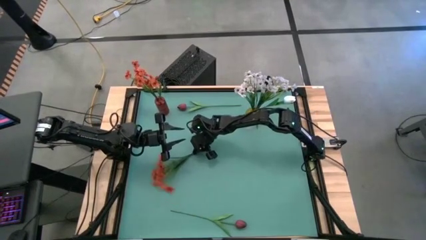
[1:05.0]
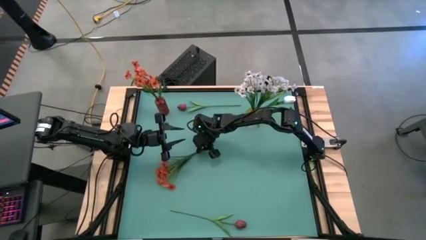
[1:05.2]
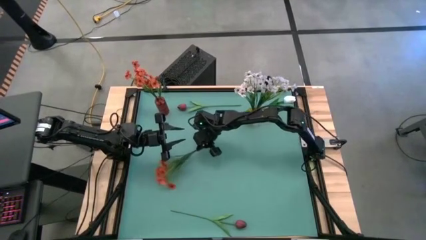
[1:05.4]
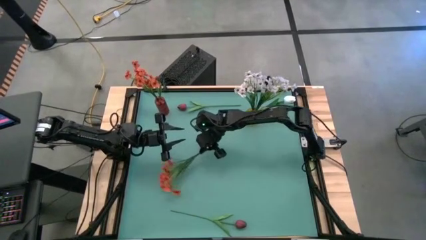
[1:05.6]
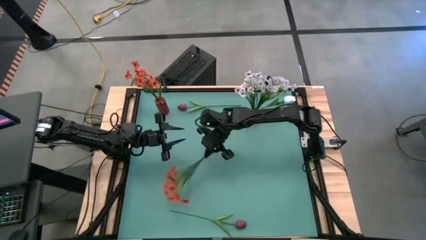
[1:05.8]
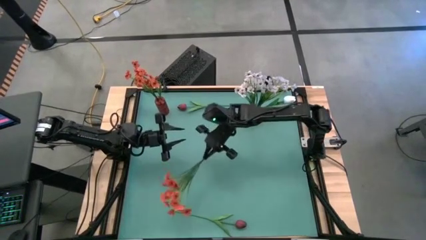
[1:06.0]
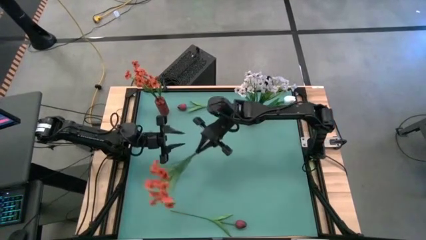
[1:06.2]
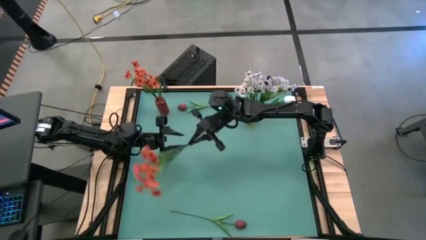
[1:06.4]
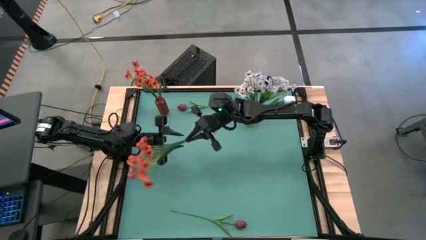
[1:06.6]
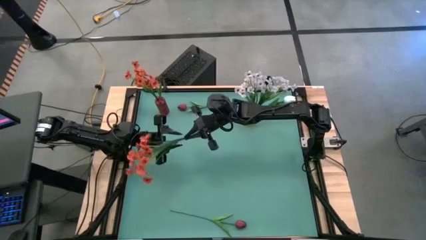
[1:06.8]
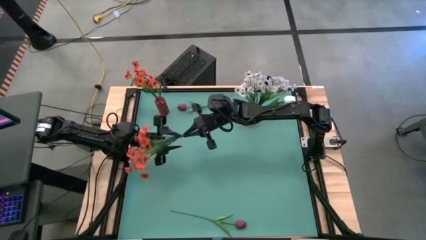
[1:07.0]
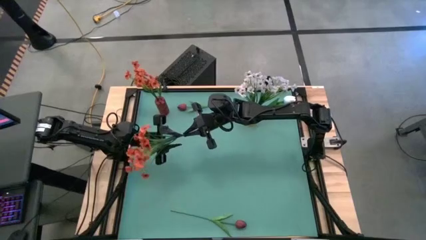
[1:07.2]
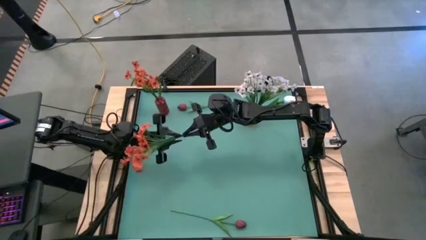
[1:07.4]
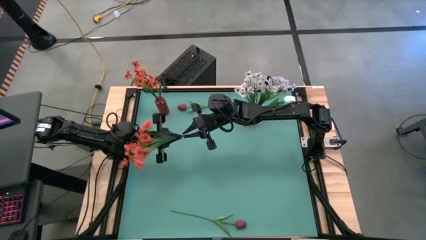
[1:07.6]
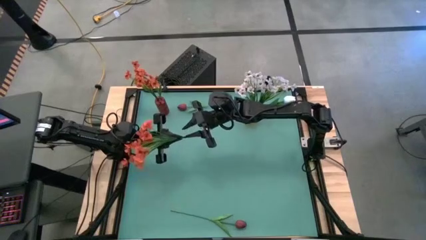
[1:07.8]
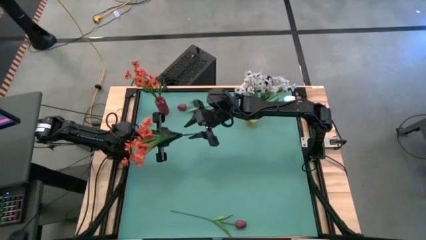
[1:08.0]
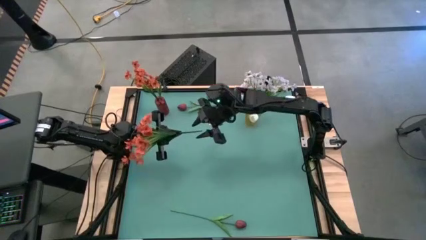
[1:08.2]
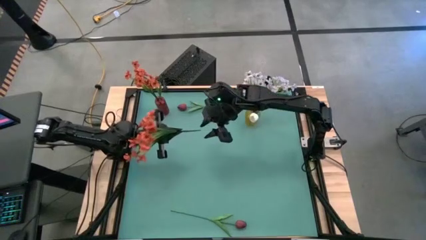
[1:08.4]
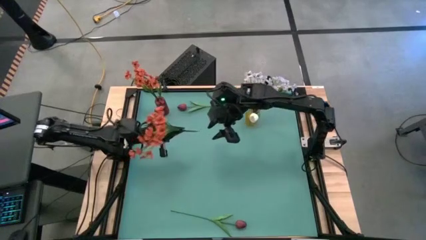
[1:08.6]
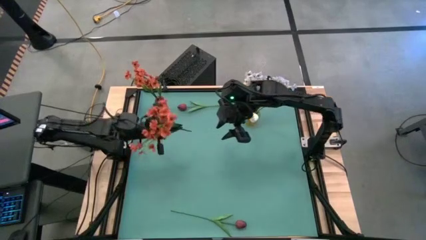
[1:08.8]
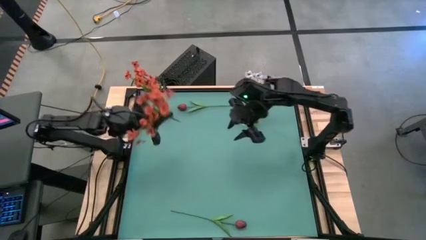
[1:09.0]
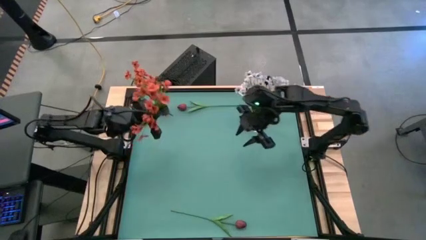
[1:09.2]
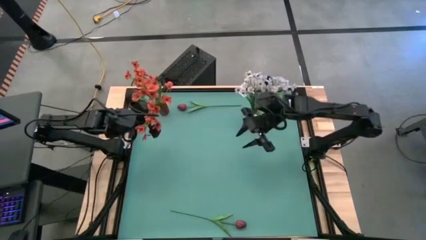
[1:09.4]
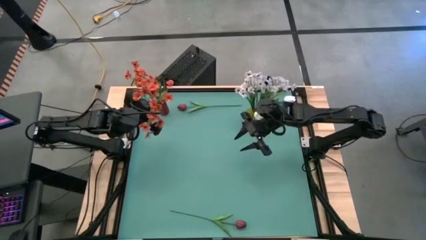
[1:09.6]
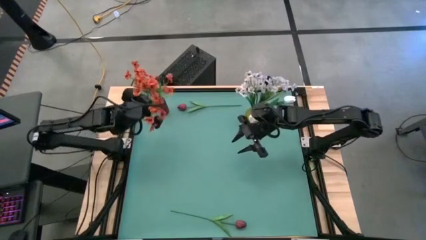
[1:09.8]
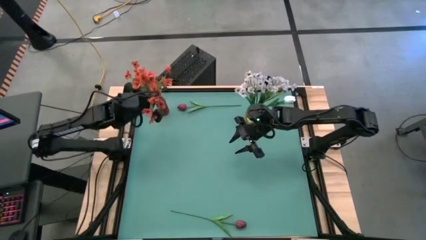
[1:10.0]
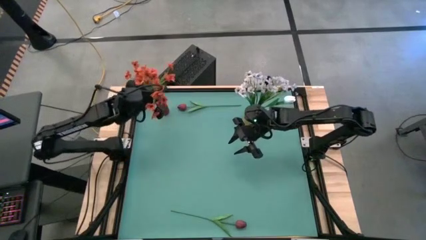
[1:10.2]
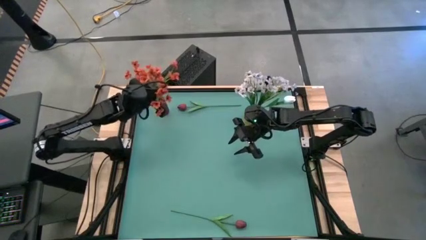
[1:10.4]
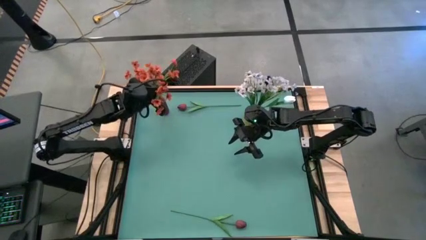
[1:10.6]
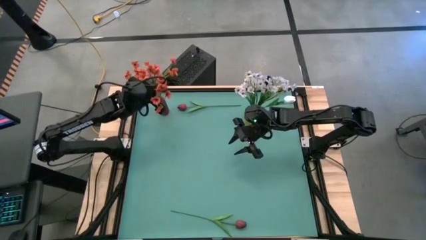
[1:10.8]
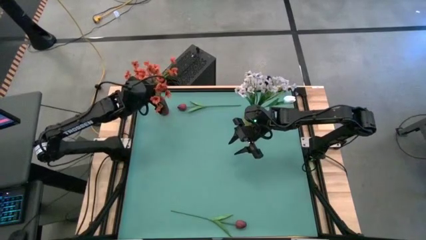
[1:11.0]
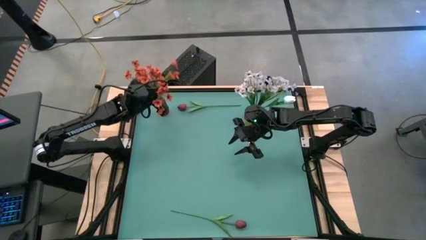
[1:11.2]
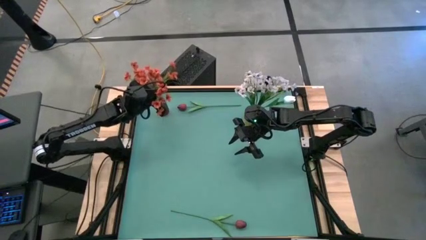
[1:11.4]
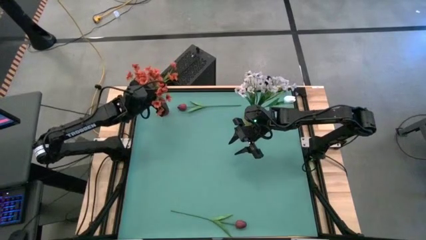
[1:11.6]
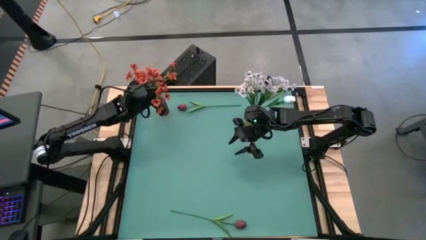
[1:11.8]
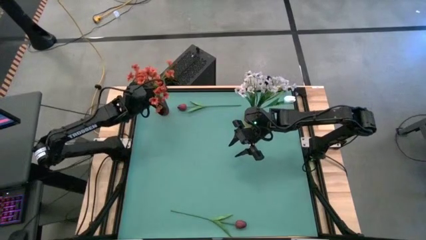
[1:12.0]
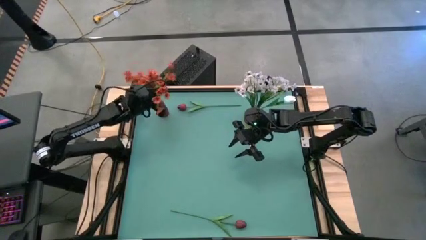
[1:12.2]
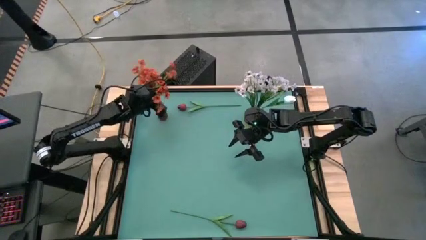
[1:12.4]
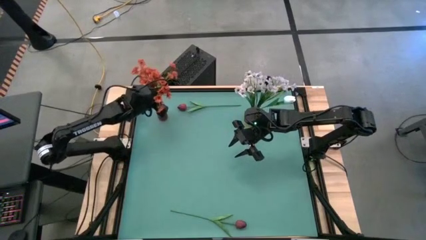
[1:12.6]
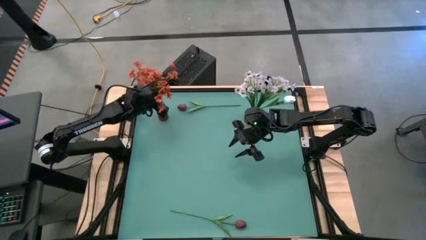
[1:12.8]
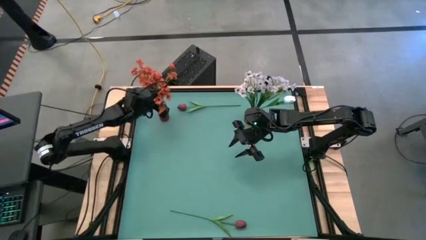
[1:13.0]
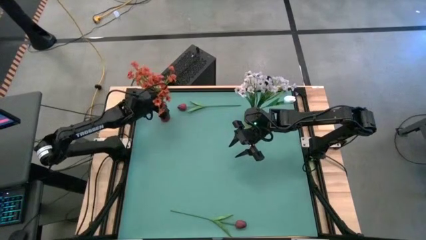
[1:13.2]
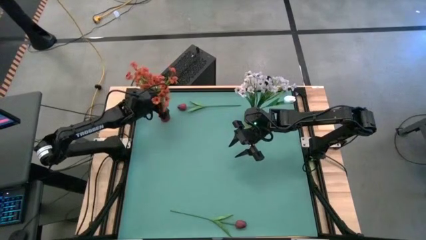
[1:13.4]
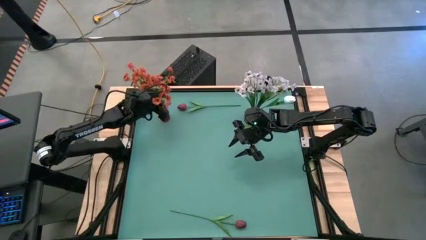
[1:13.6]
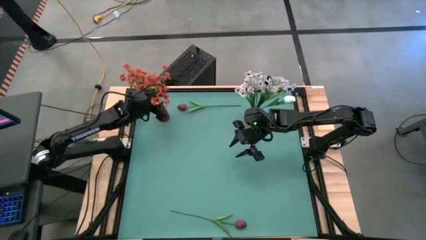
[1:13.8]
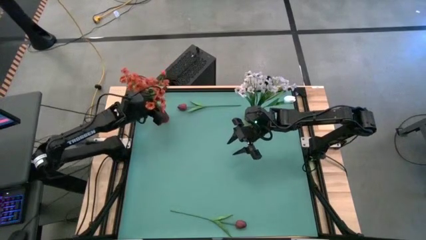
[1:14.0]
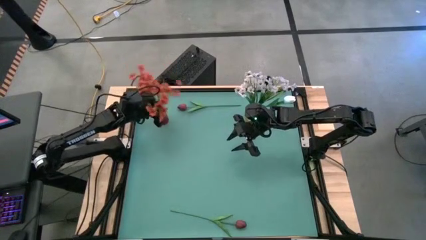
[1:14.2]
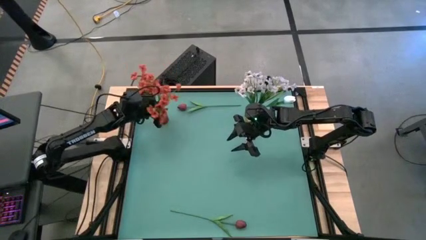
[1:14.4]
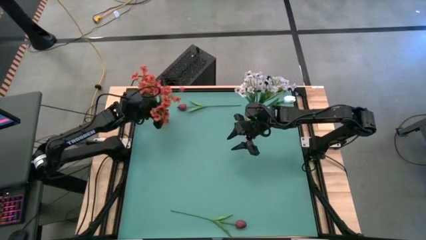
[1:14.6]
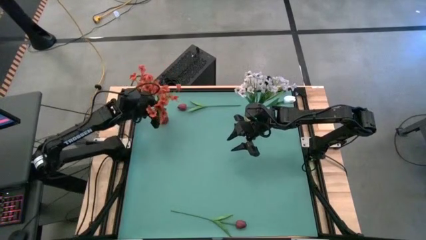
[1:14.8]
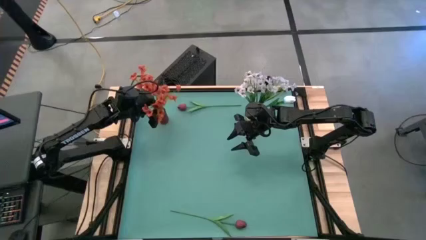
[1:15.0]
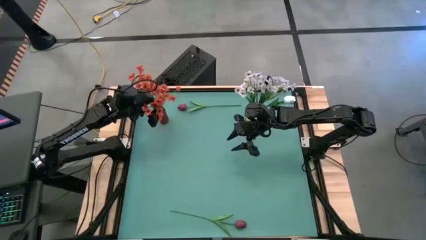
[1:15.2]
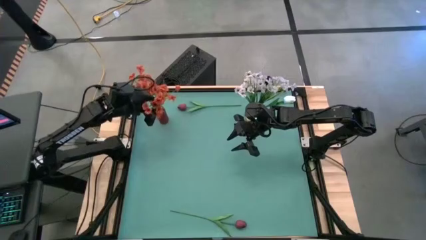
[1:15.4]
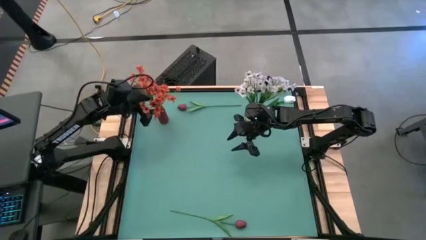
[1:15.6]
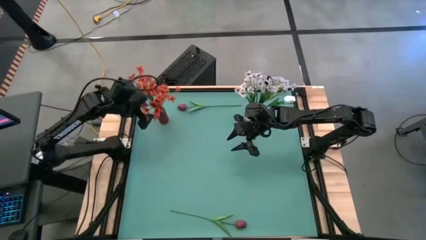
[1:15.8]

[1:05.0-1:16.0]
Task: Sort flowers into vase by color
Put the orange flowers into the red flower vase

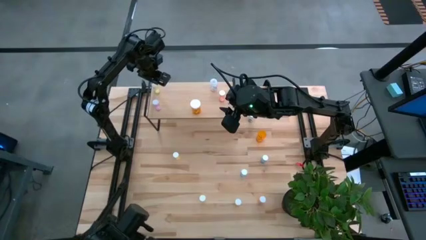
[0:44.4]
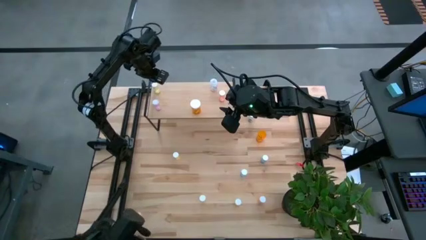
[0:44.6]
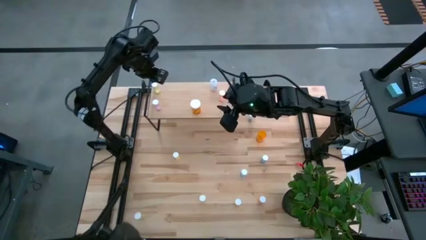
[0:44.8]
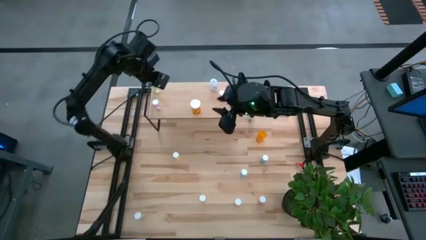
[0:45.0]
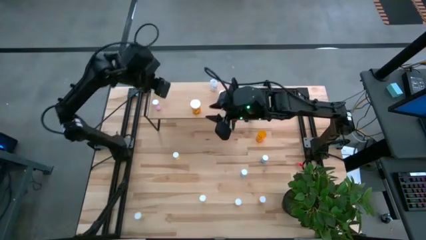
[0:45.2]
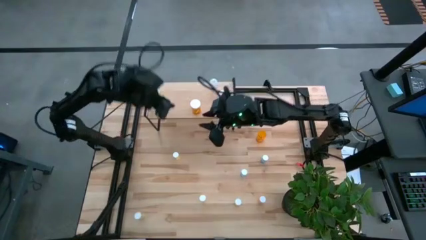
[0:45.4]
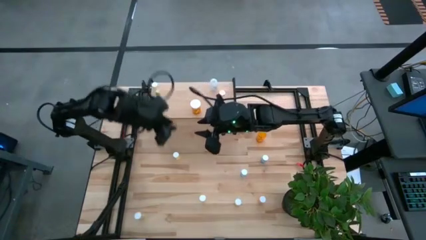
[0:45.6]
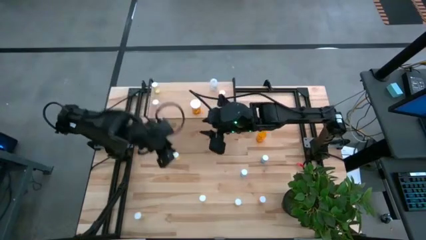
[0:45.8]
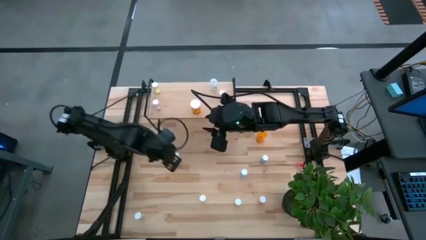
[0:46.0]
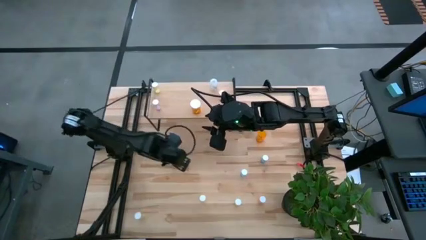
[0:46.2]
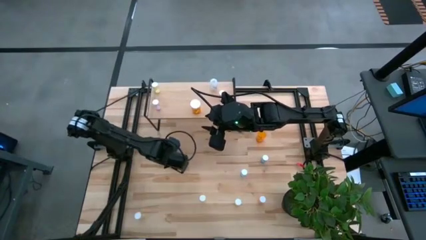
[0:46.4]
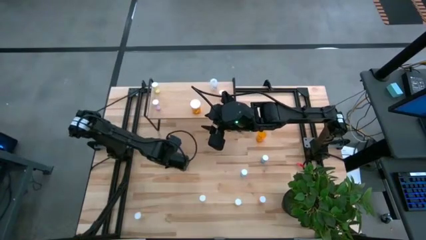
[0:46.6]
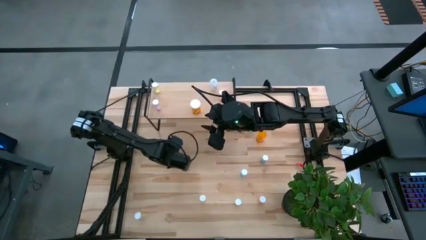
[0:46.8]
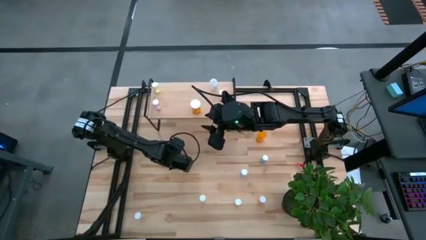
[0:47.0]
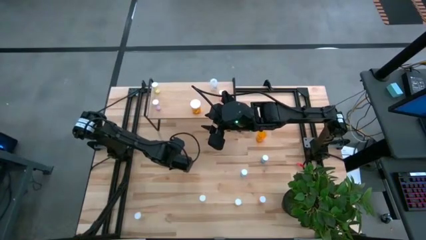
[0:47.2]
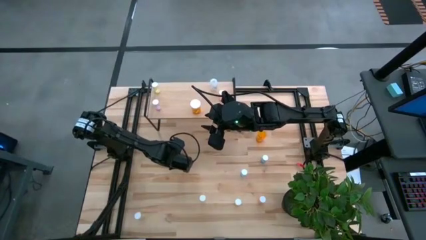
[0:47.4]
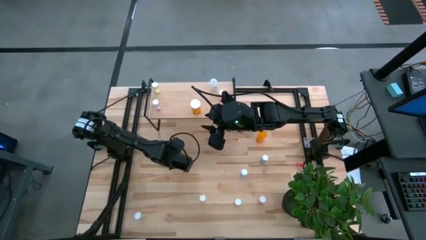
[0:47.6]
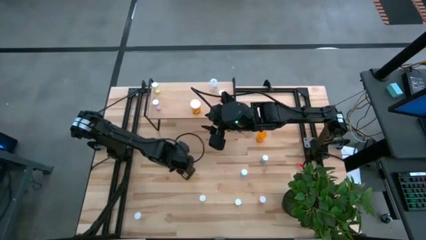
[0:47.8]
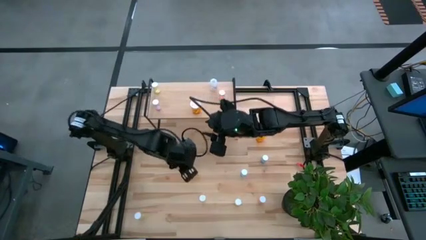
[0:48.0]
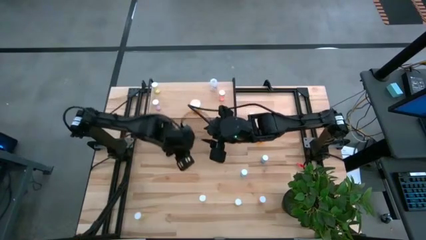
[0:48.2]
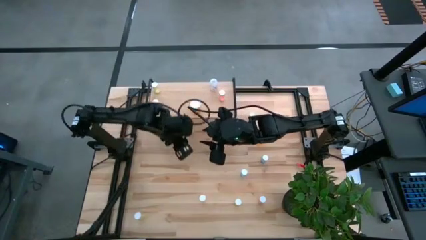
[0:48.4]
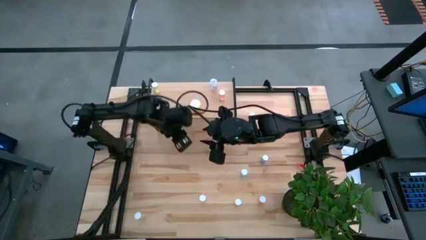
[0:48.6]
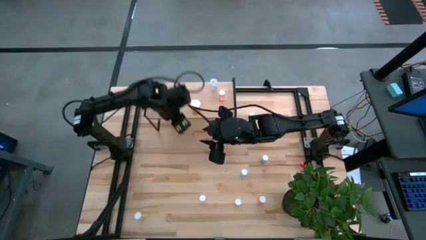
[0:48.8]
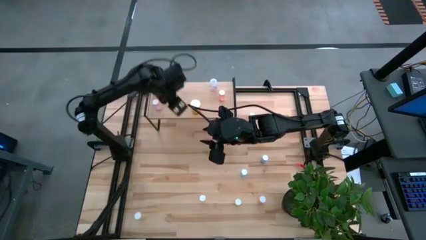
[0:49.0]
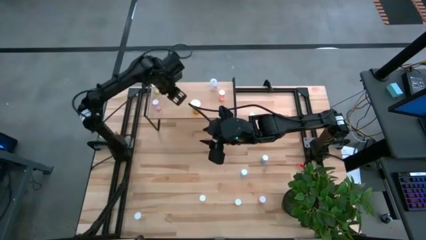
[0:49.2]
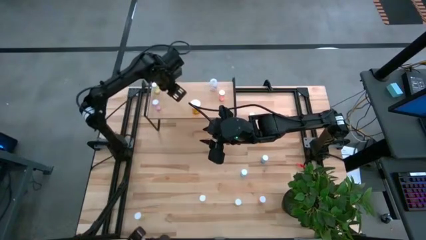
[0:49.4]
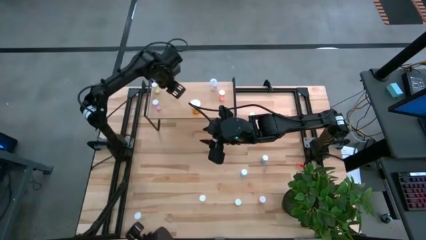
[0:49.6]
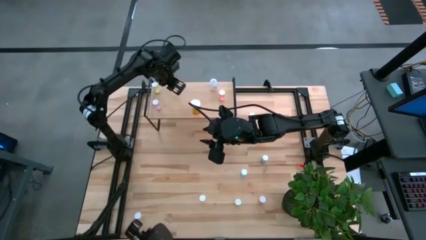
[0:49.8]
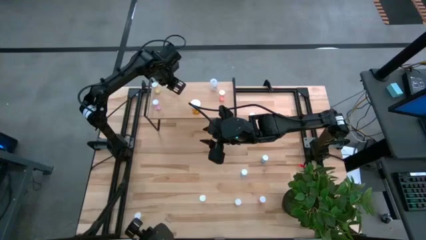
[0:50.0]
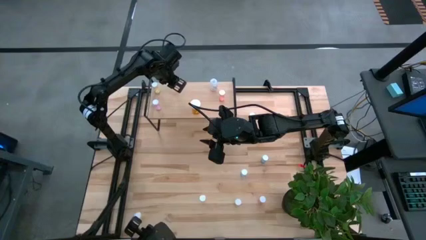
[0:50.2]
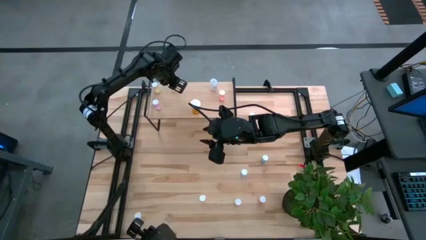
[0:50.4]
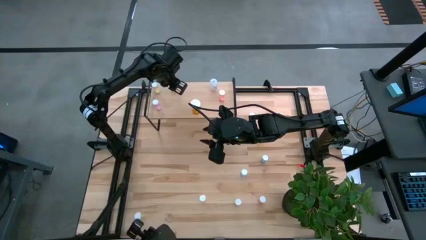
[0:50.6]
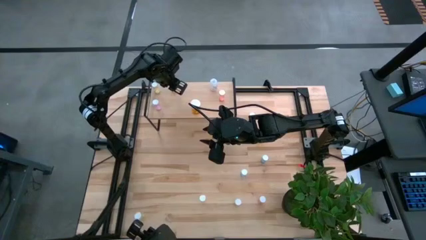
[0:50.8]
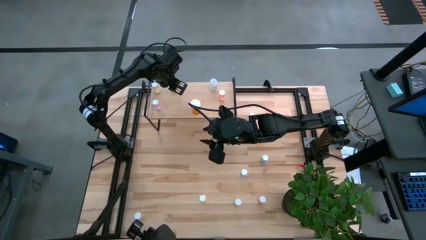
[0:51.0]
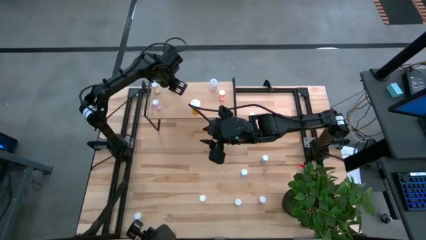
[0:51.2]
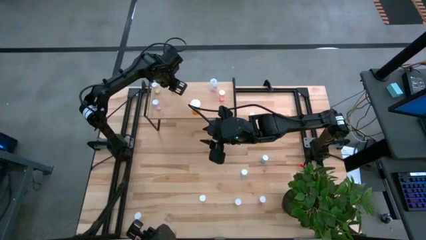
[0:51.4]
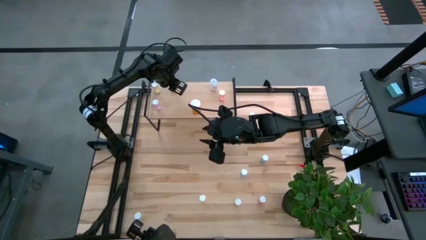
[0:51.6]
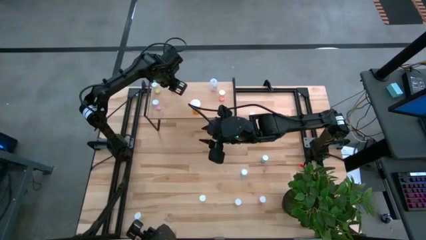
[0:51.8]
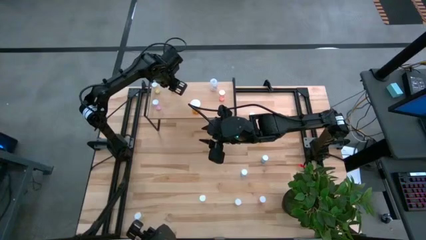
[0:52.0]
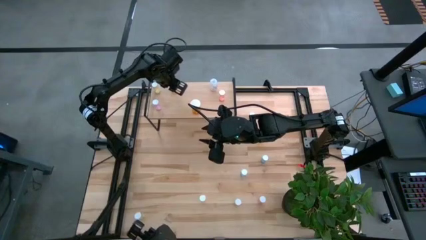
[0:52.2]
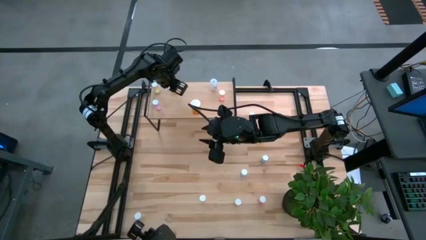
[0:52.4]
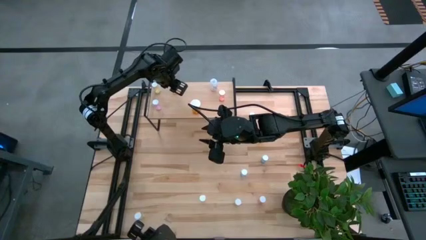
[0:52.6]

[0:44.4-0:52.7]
Task: Pick and place medicine bottles onto shelf by color
Put the yellow pill bottle on the shelf
